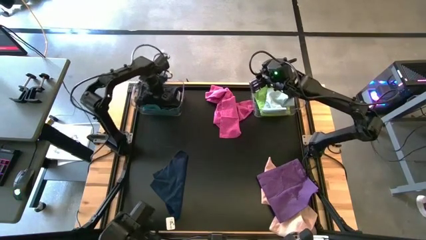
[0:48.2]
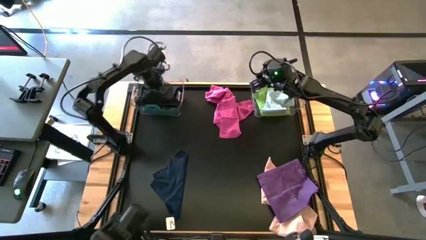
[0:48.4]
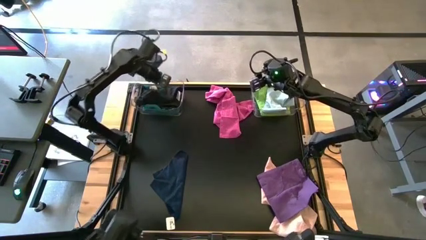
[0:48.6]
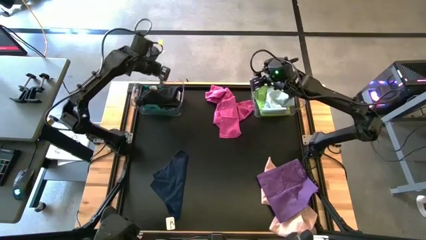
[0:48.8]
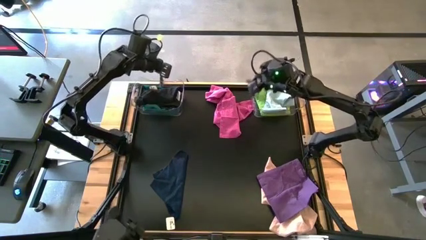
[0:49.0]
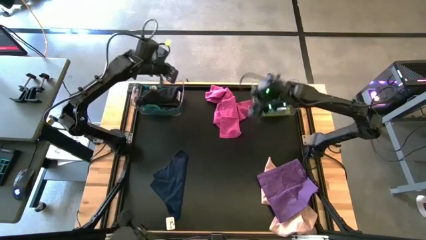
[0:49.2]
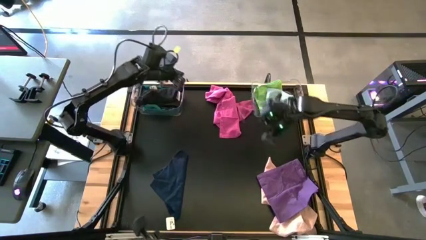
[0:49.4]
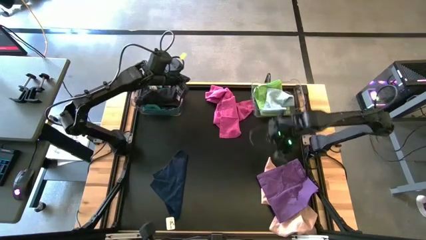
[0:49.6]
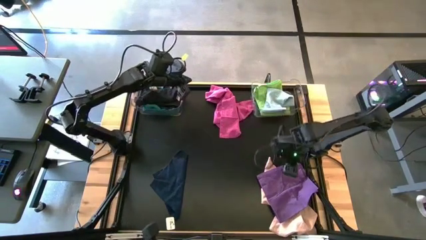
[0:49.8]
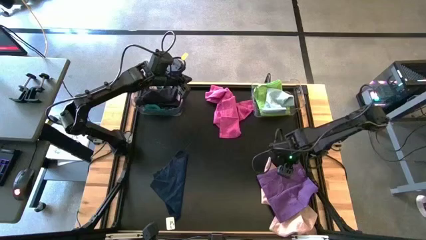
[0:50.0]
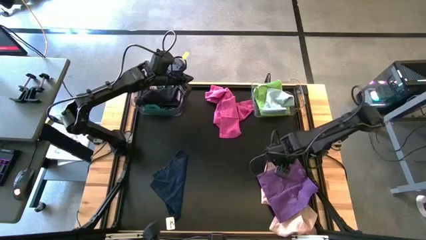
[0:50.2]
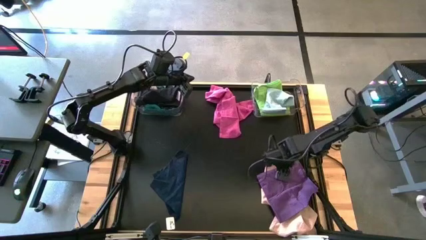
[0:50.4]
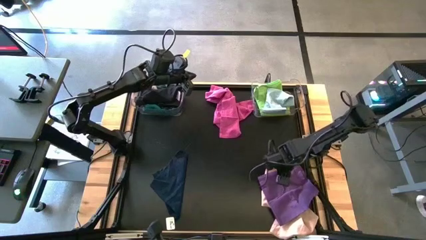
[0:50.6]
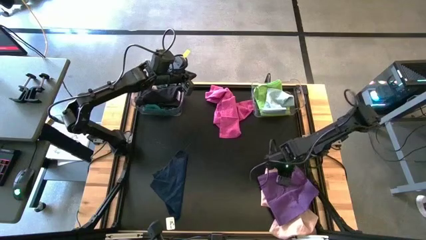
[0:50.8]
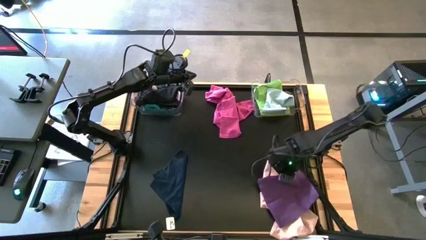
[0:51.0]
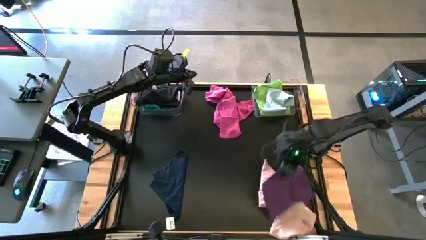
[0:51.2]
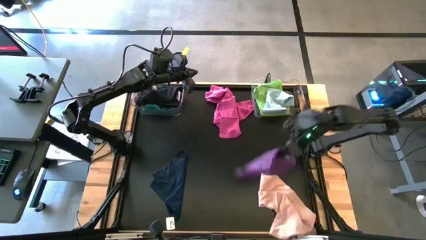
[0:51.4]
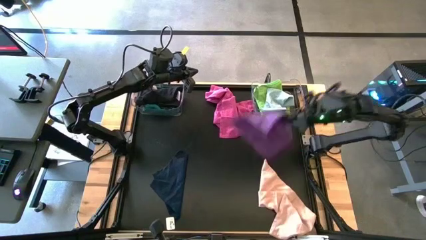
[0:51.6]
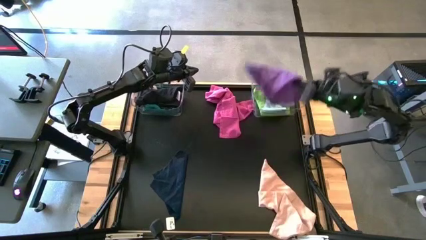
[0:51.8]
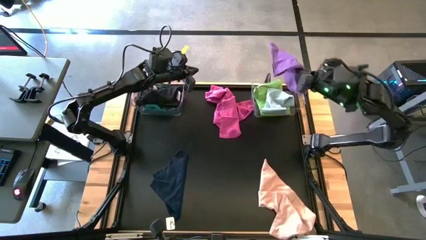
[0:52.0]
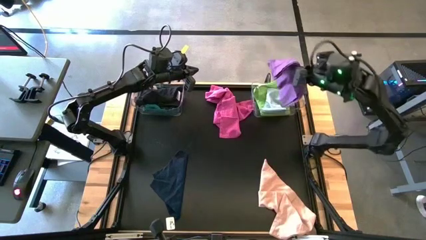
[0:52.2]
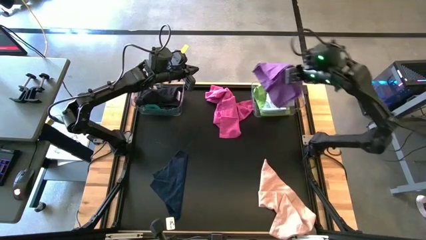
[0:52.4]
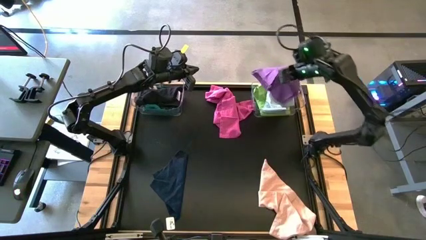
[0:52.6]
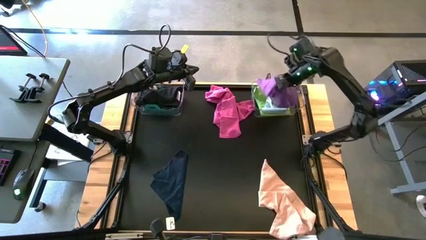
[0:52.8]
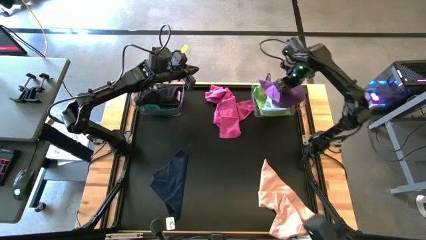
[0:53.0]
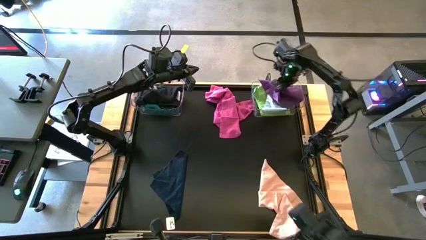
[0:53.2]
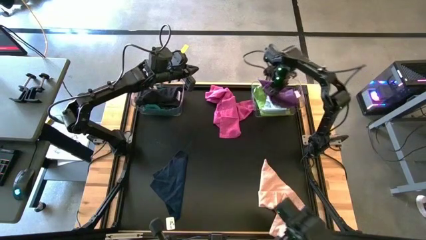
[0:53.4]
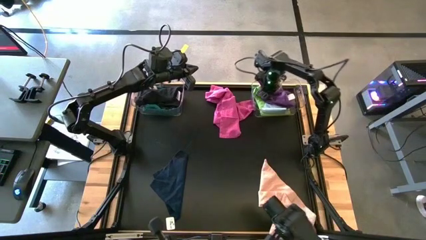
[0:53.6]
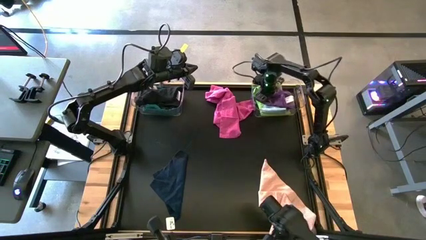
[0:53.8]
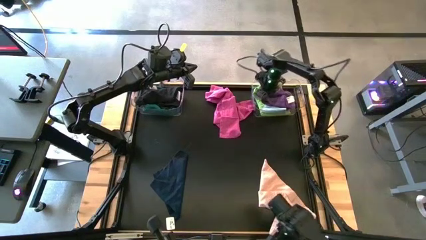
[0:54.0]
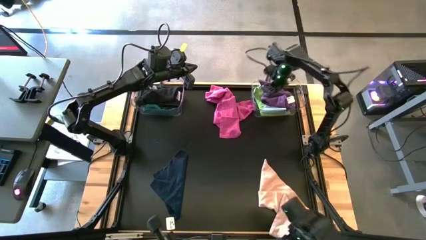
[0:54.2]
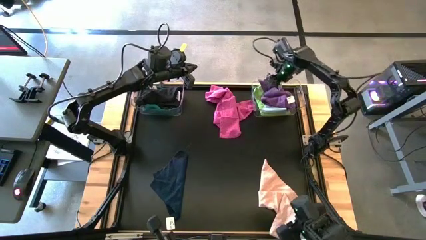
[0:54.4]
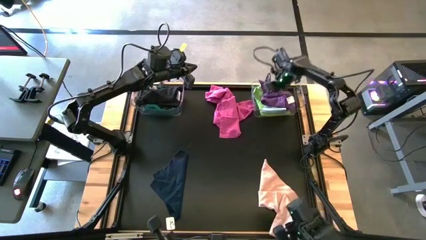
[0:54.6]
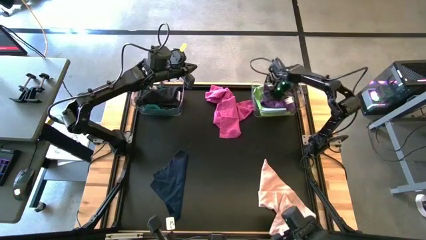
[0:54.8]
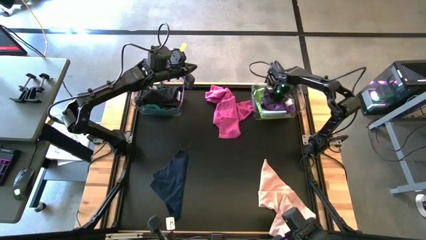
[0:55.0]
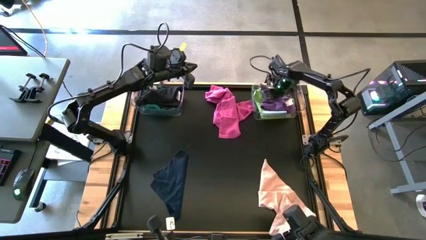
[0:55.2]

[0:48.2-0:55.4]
Task: Sort towels by color in basket
Put the violet kitchen towel into the left transparent bin

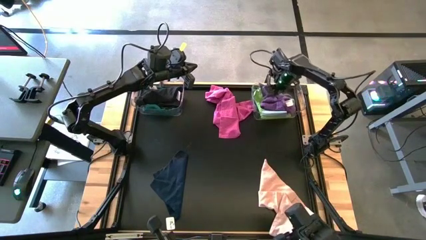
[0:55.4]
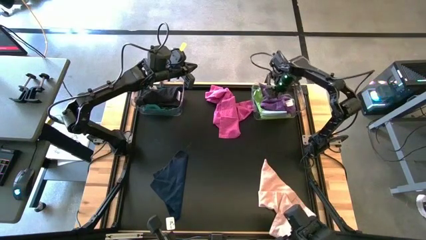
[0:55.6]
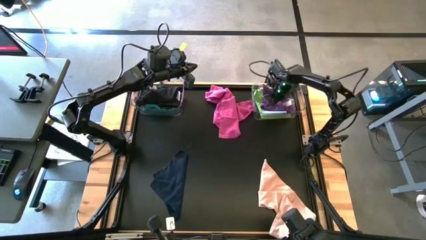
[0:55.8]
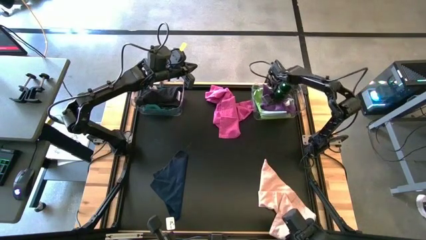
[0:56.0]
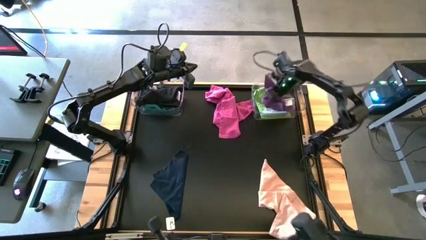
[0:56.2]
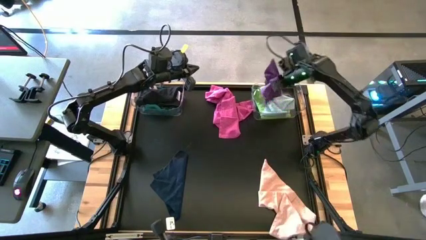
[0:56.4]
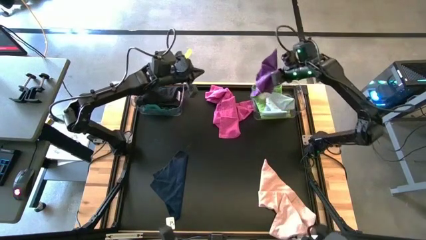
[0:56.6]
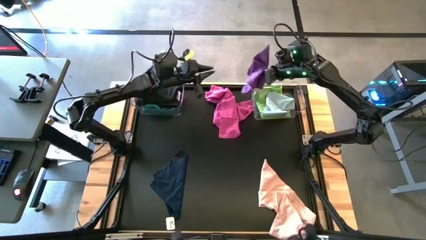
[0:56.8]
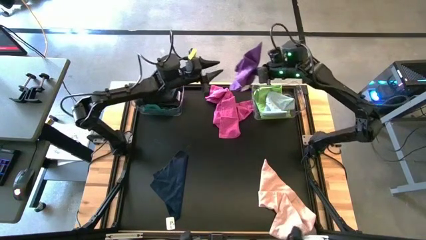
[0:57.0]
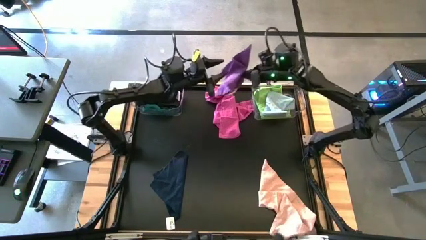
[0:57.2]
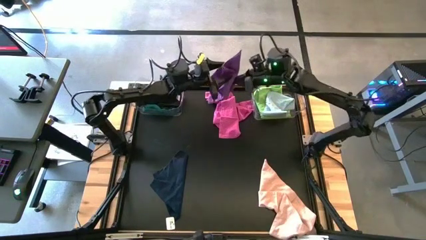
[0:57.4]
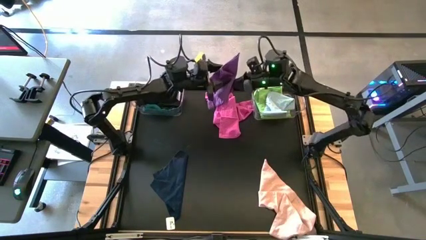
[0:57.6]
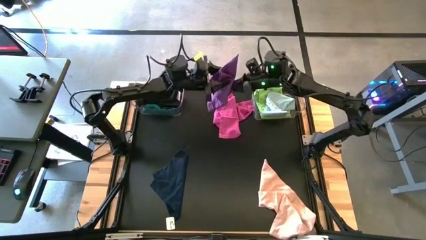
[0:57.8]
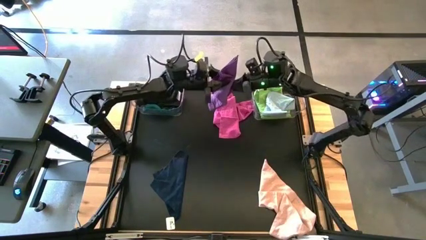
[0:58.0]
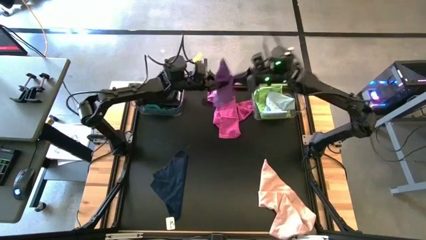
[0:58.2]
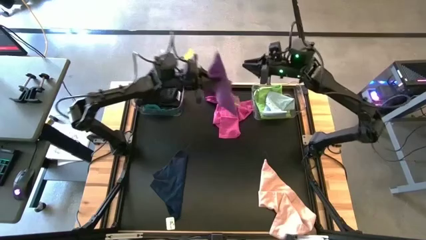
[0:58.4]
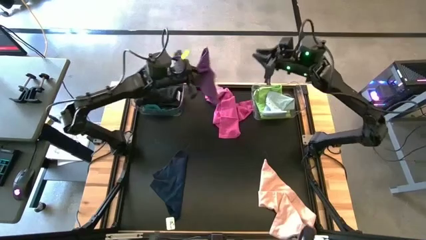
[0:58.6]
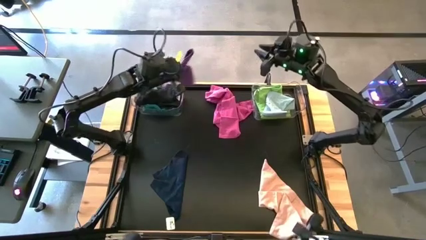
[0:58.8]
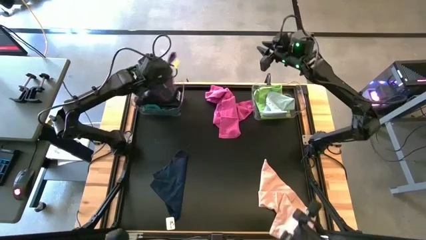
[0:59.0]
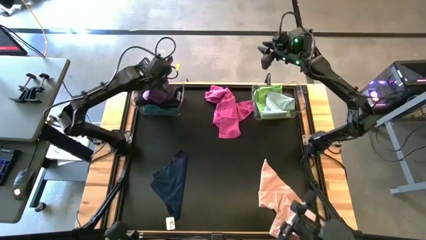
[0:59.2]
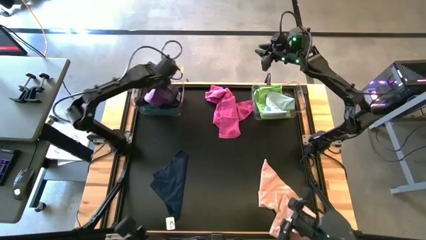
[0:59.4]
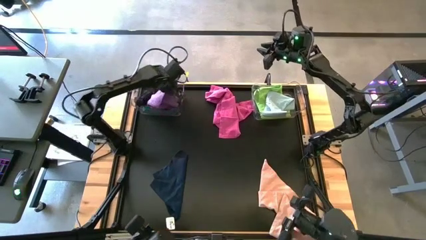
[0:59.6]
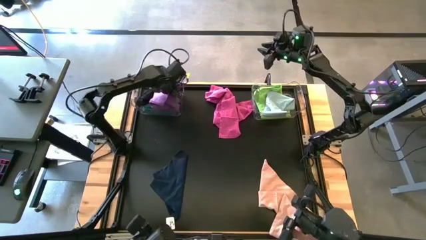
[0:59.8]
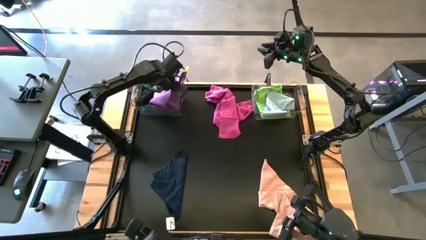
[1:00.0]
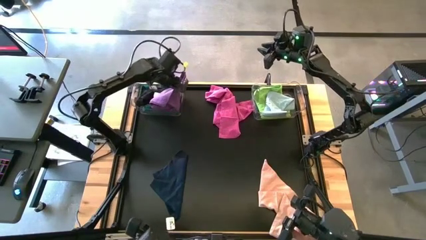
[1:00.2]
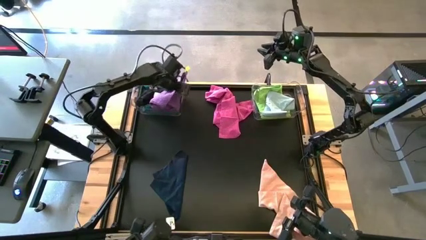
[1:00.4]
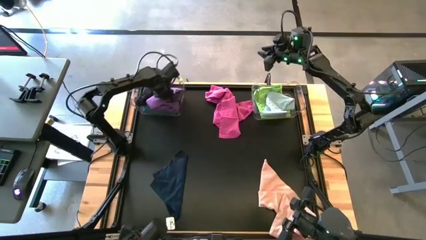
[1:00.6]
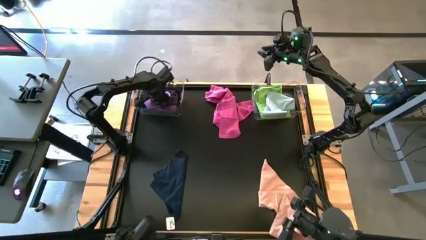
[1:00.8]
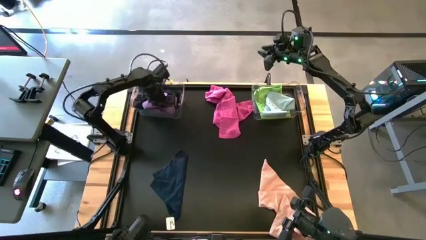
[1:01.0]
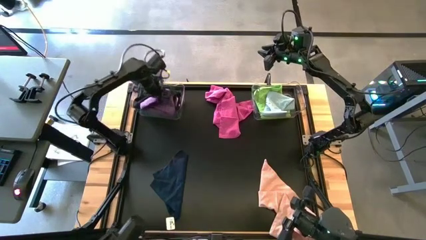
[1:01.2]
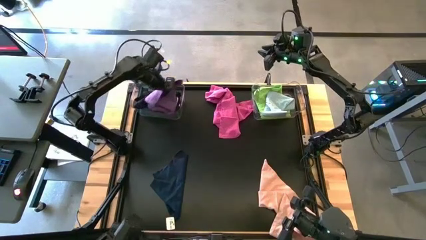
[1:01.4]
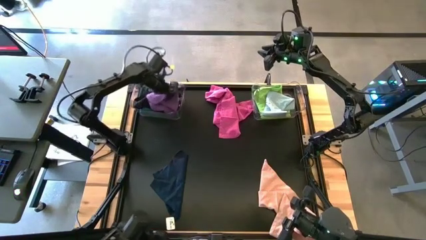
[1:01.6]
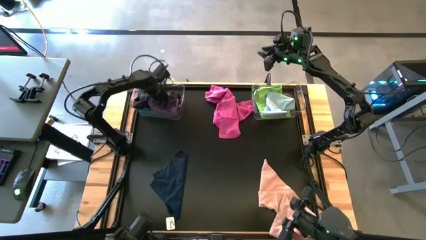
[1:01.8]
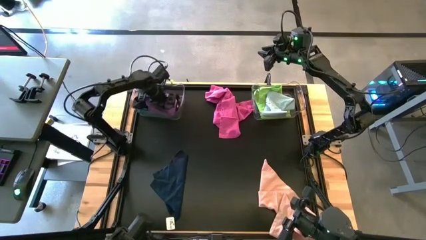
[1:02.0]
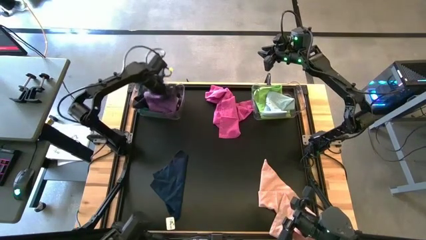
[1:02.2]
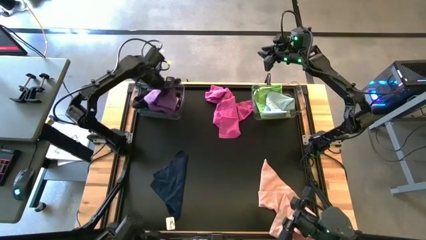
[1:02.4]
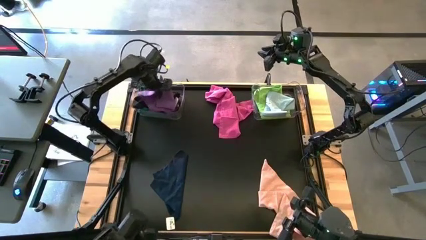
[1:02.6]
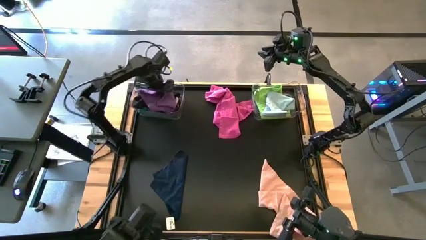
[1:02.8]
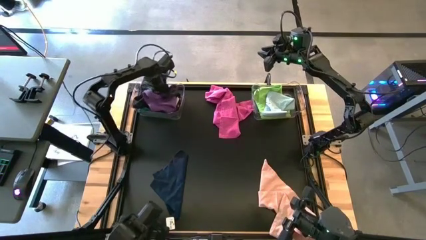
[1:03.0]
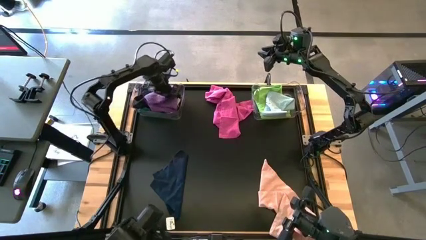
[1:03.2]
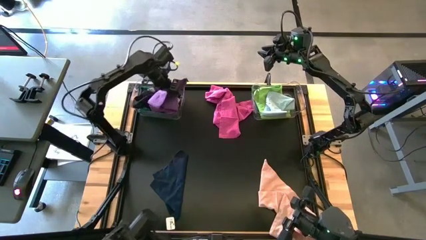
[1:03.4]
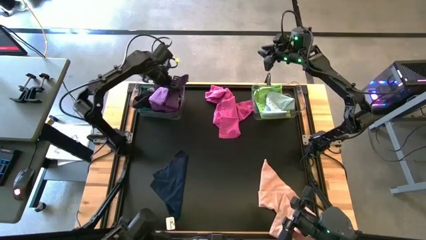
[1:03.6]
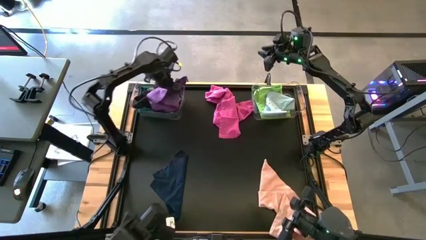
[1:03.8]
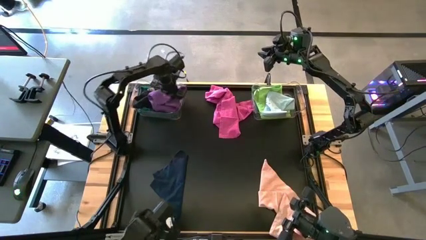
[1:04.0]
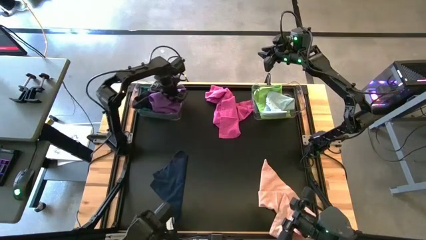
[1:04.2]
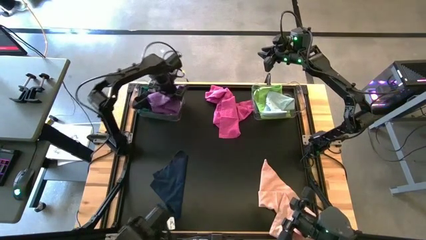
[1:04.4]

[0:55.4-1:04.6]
Put the violet kitchen towel into the left transparent bin

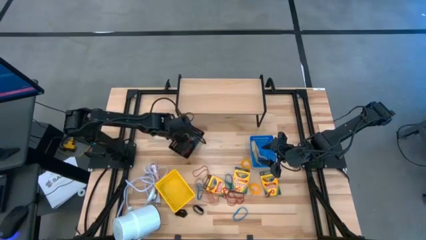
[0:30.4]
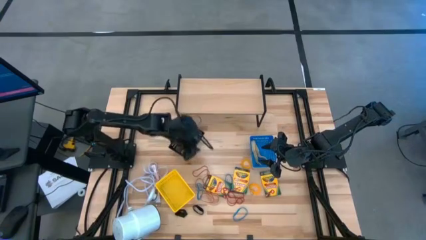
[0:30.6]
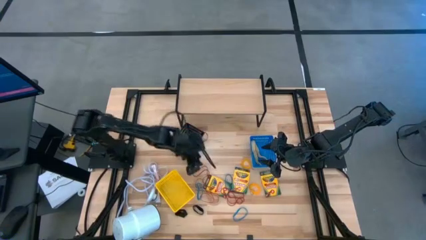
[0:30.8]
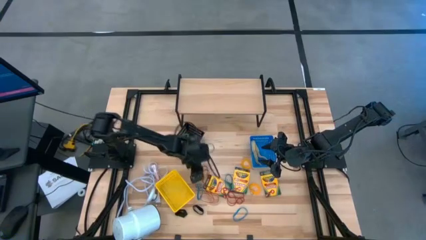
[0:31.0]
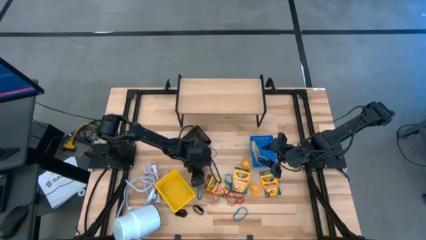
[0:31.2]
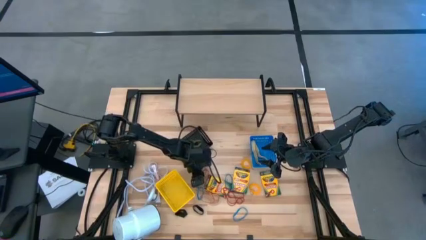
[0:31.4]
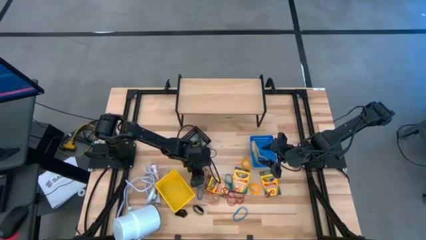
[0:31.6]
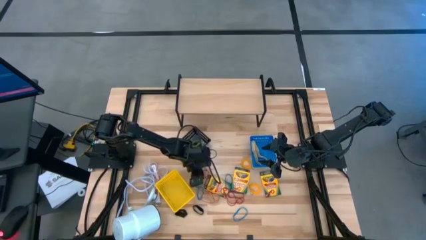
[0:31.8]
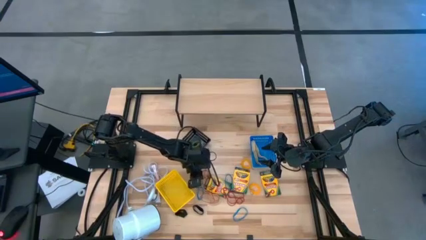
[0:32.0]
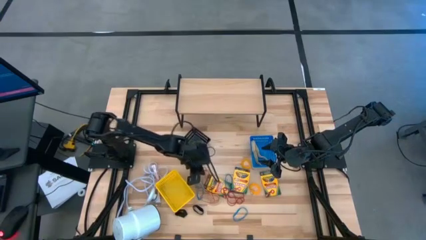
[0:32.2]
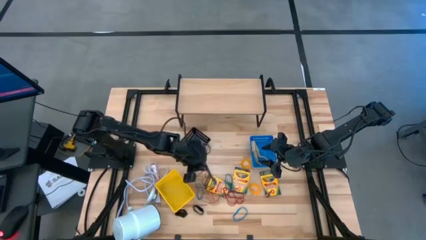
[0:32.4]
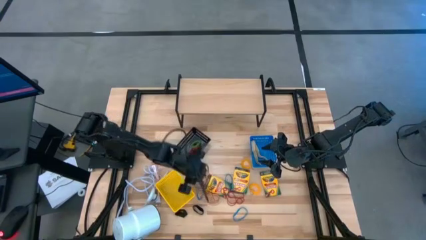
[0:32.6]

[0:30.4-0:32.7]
Task: Pick & Place Office Desk Supplies
Put the red rubber band into the blue bin
